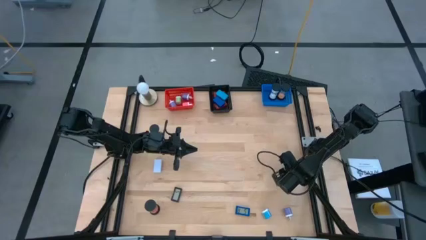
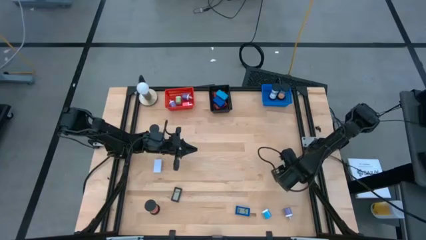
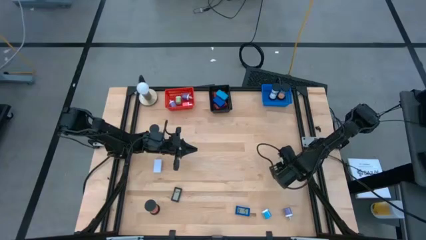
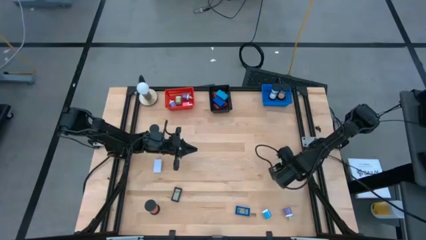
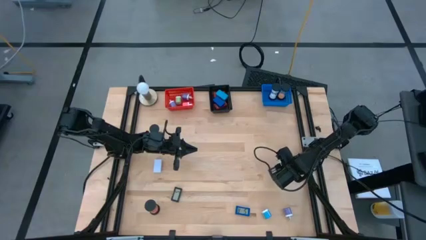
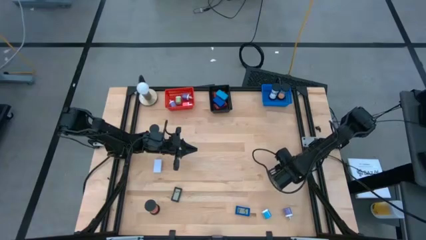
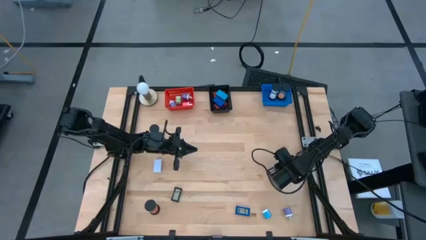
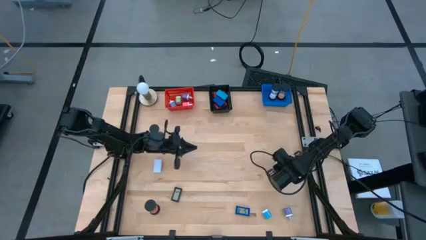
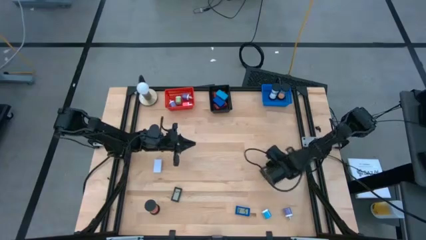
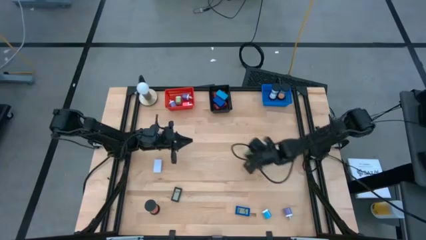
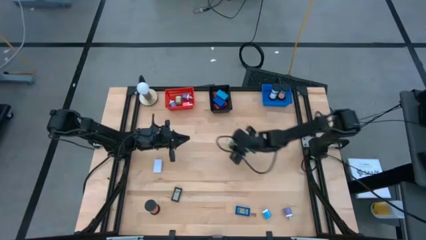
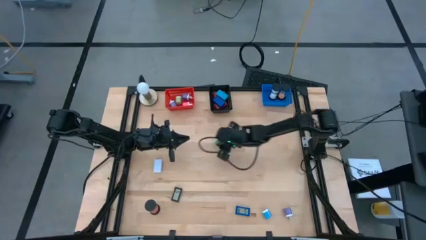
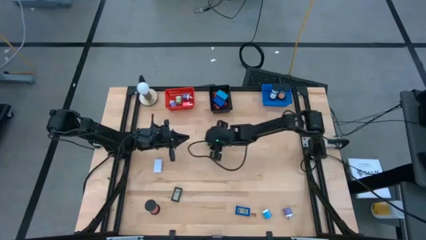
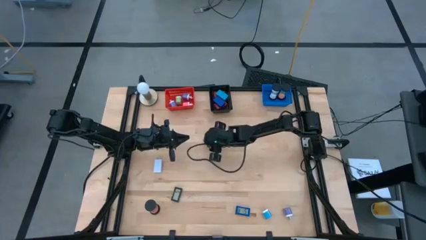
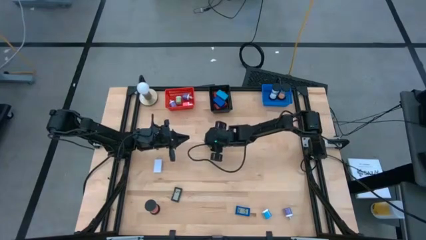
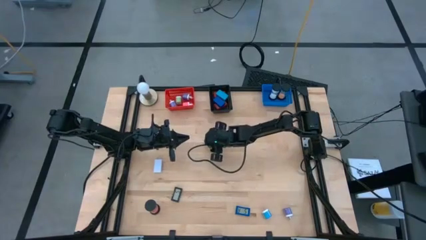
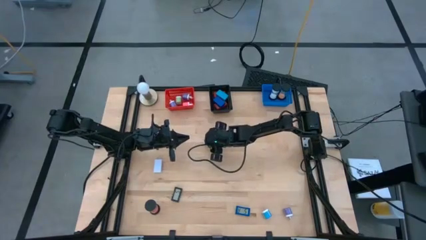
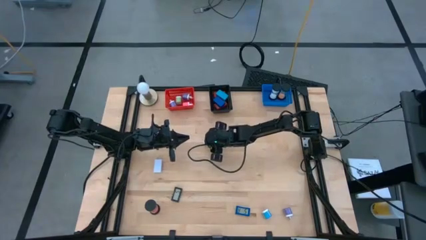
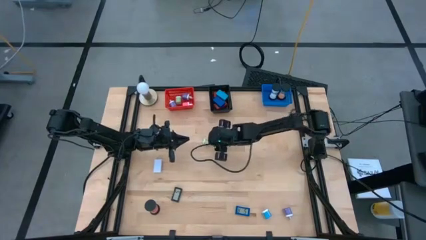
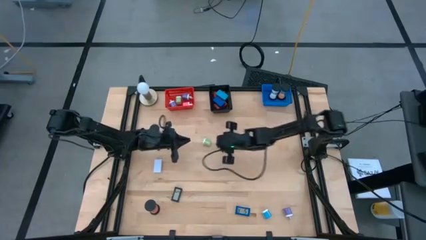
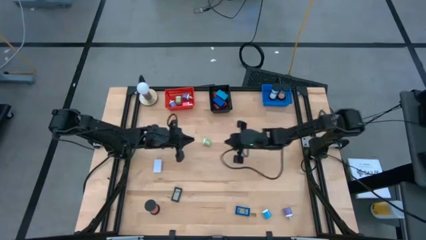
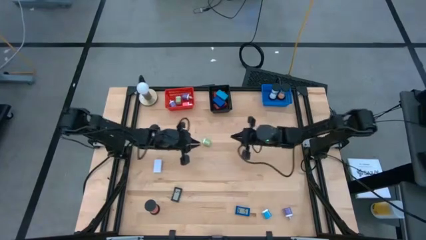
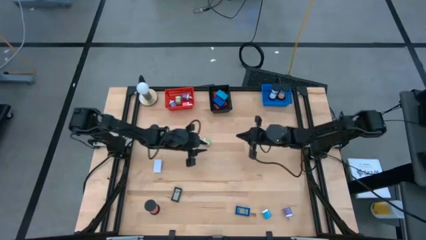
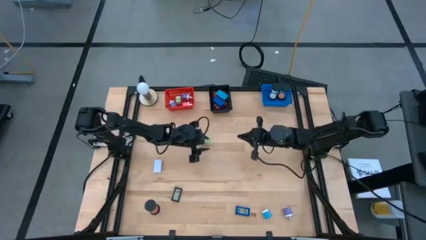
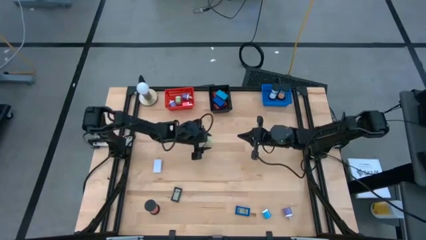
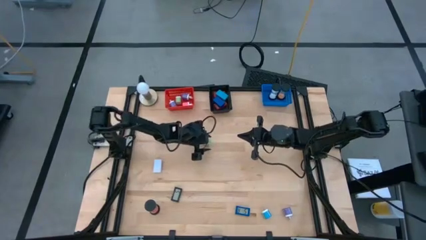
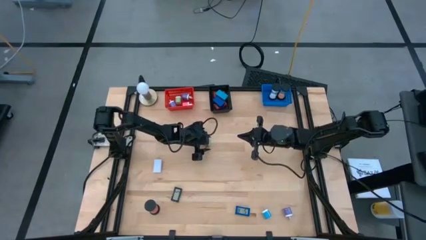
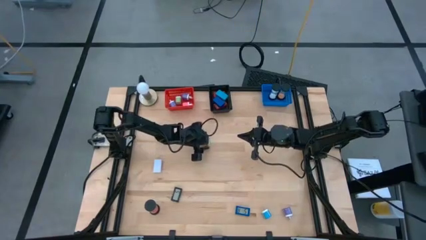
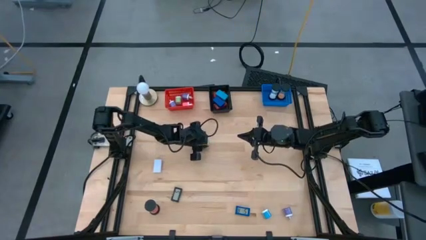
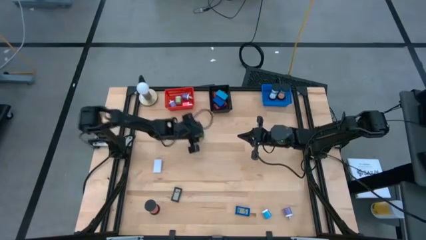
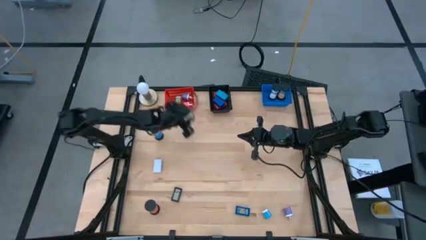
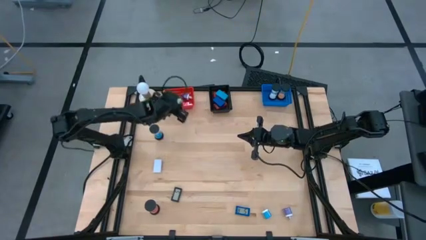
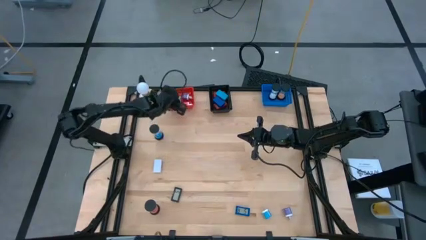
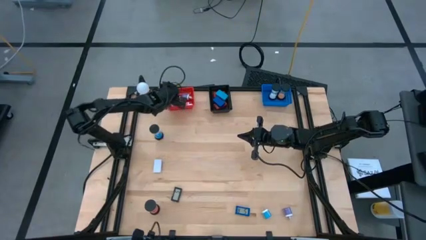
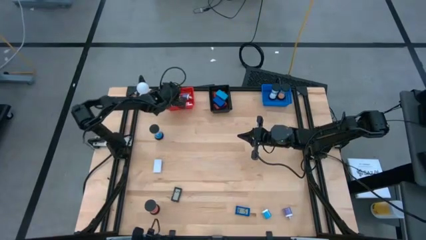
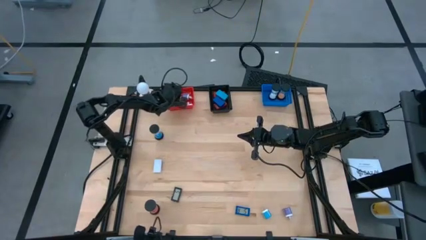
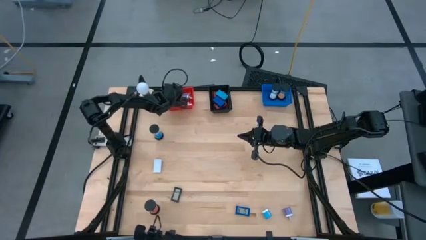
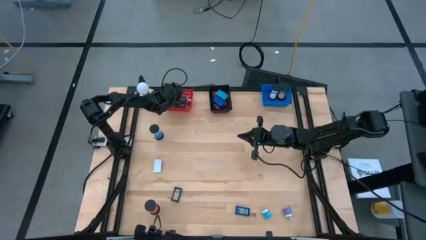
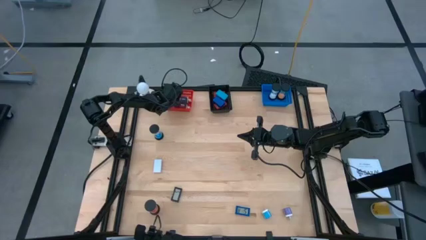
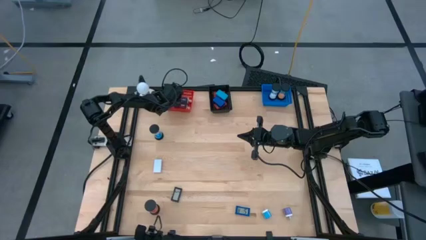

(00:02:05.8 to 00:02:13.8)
Task: Pick & Place Office items
Put the green charger adapter into the red bin

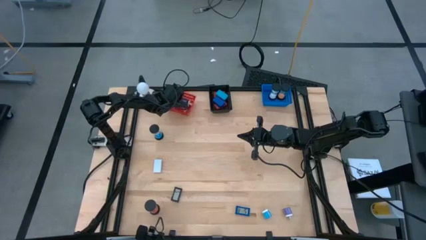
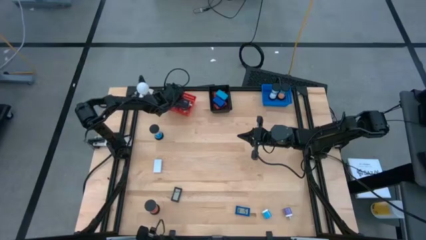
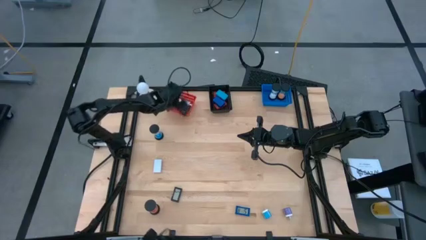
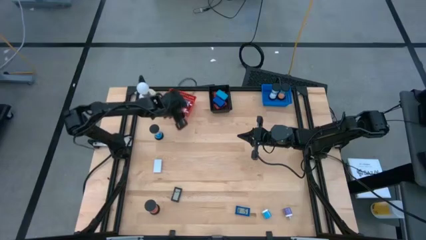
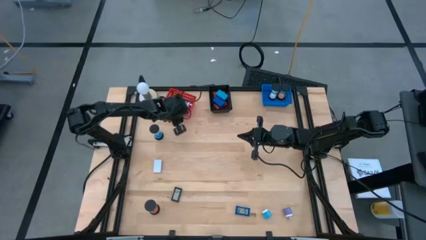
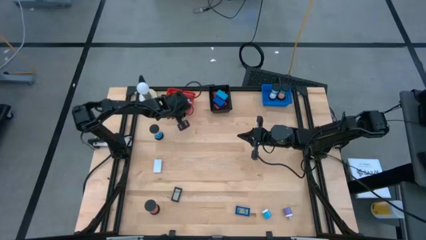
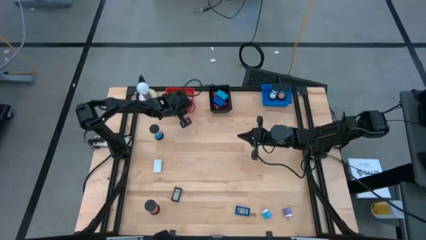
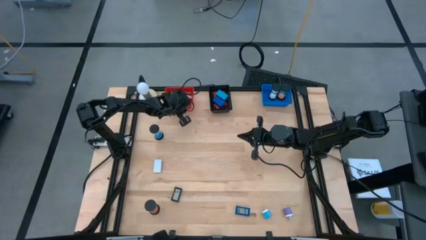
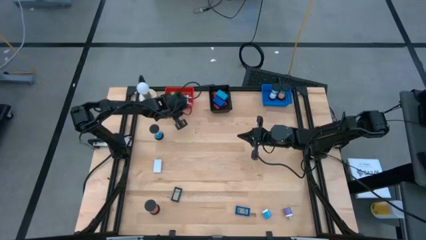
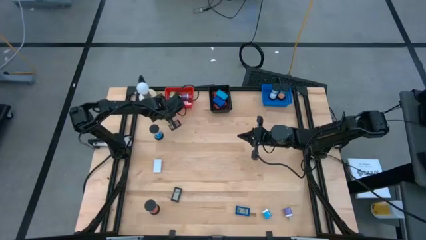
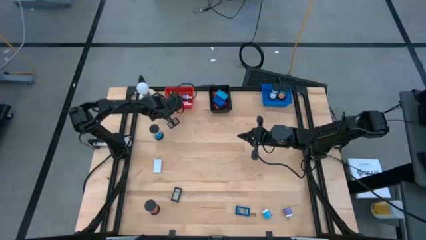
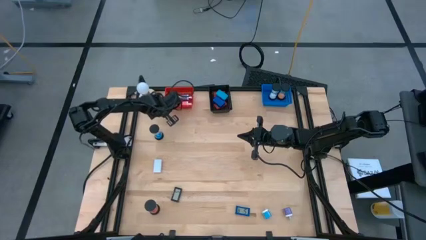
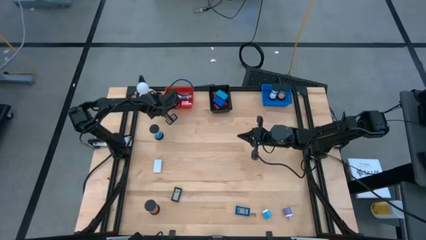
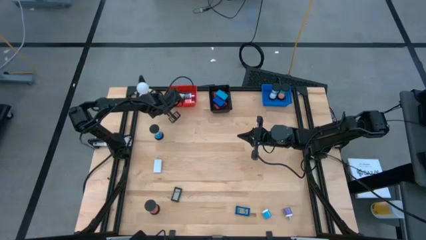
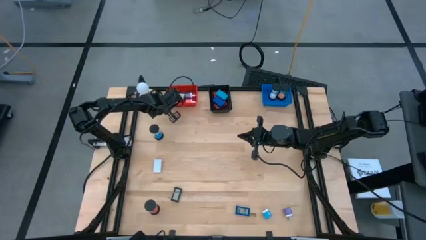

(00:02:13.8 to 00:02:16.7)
Adjust the red bin

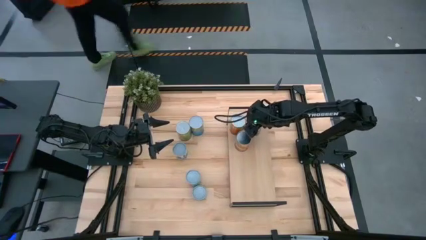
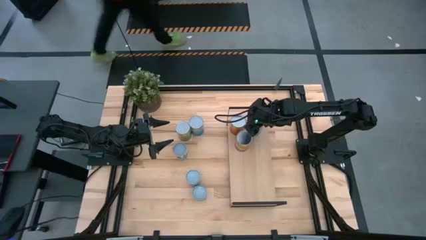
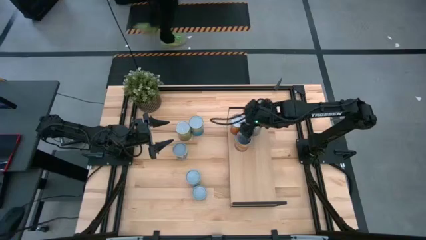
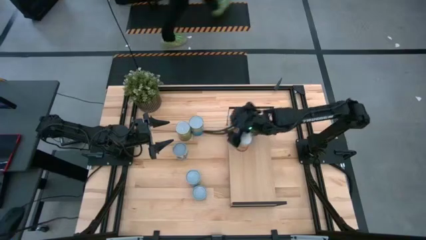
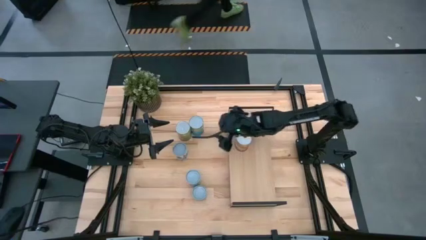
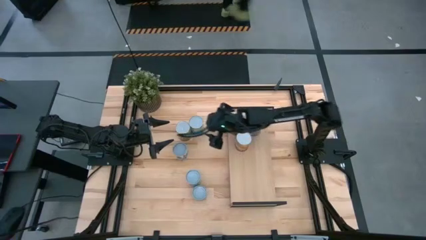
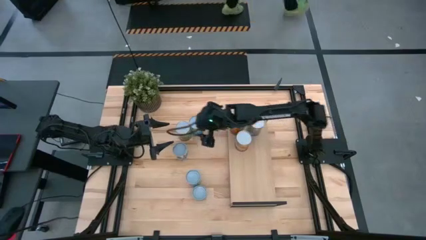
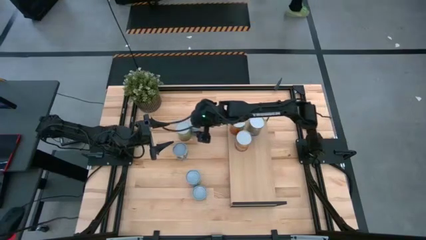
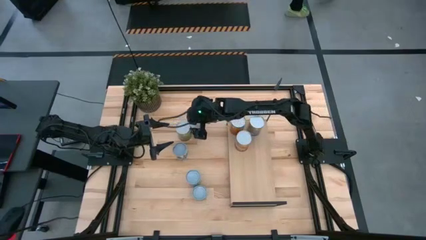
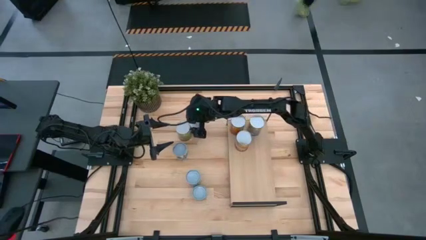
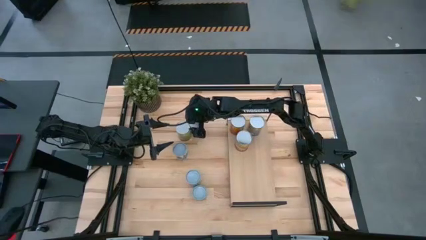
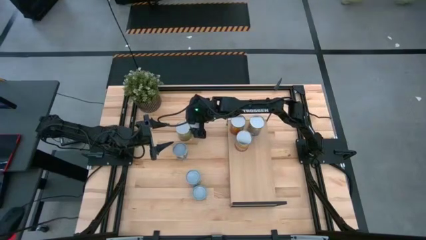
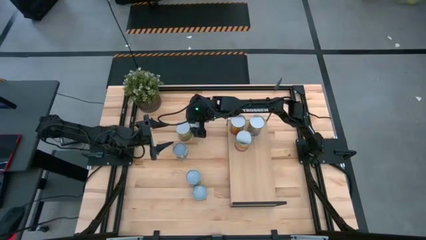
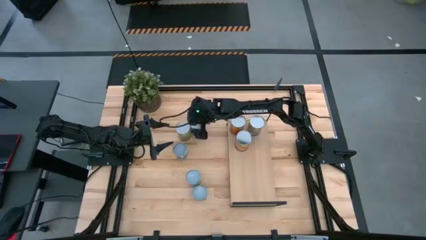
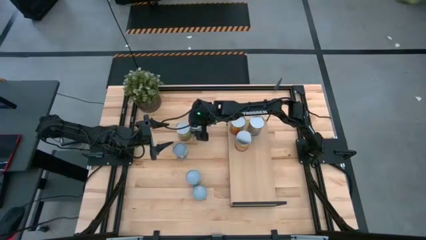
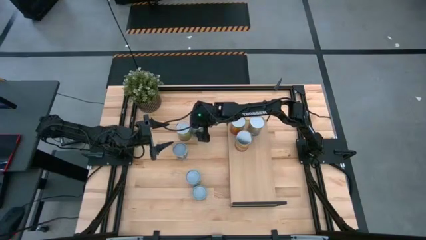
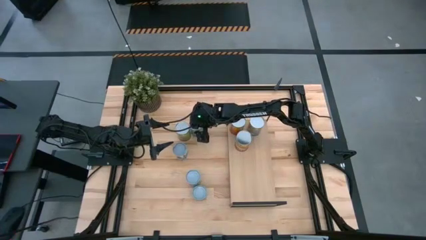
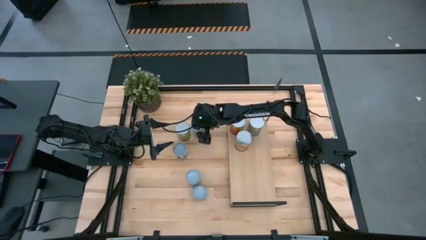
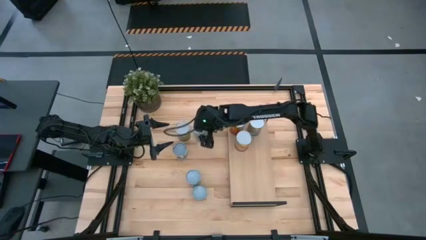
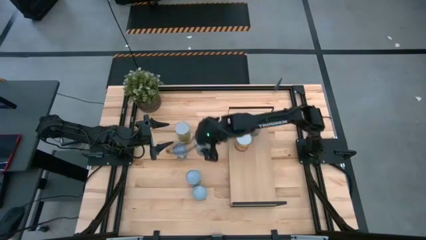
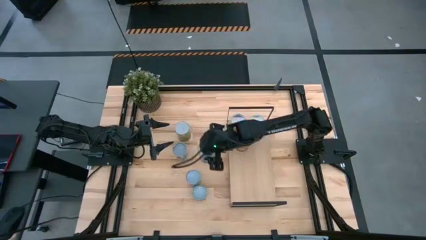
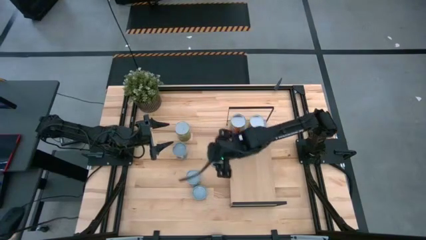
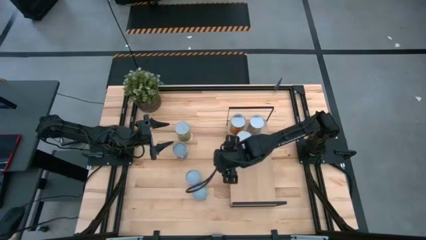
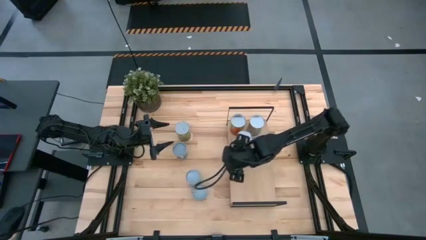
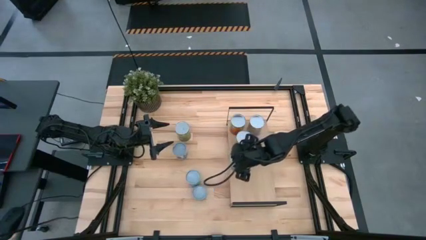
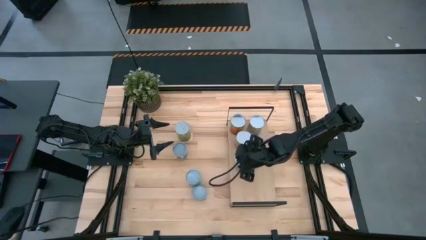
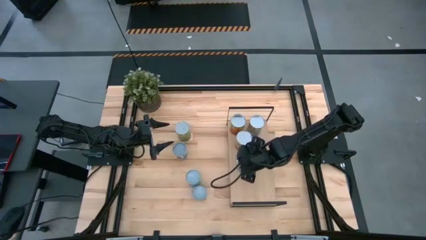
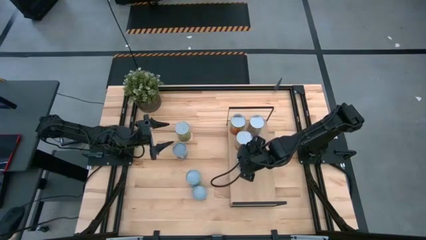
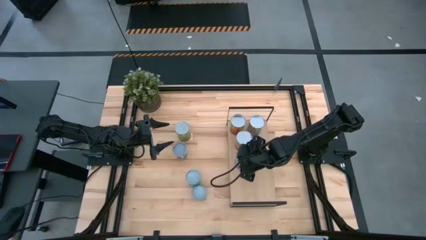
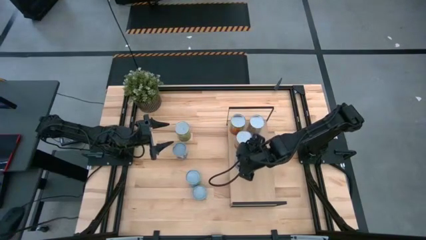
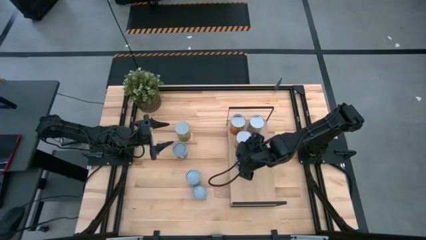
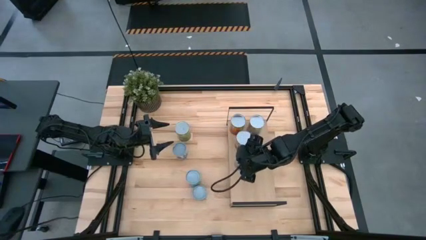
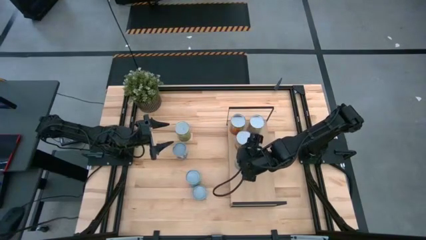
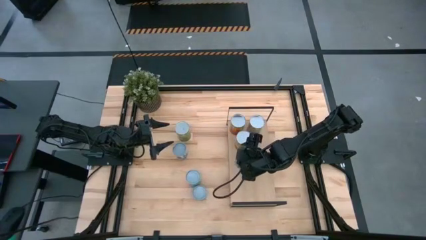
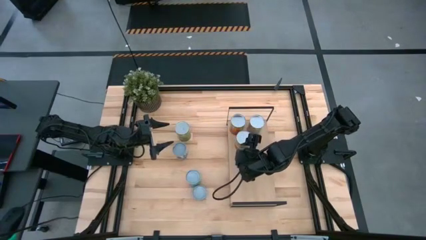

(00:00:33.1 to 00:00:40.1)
Task: Pick and place cans onto a shelf
Put the canned cherries on the shelf
